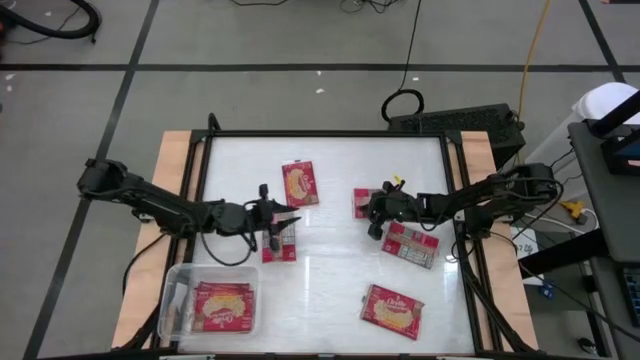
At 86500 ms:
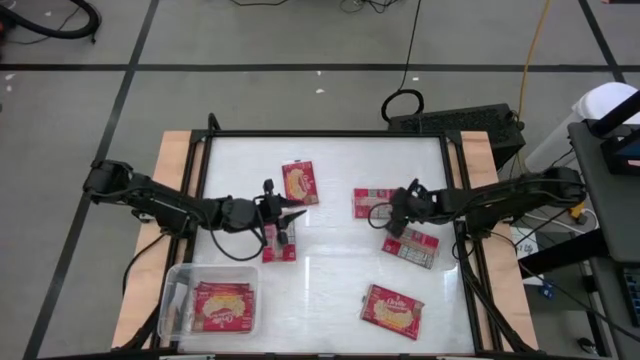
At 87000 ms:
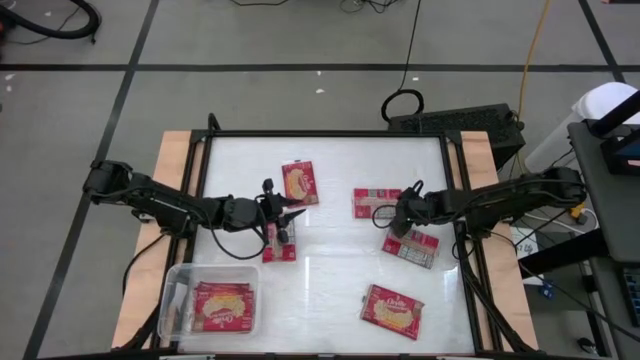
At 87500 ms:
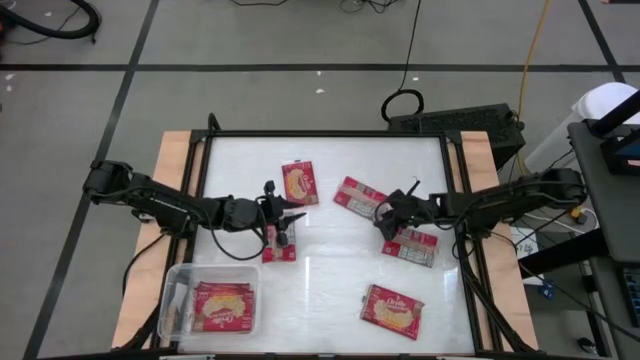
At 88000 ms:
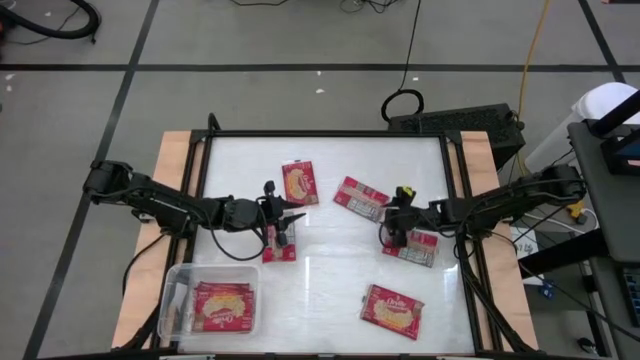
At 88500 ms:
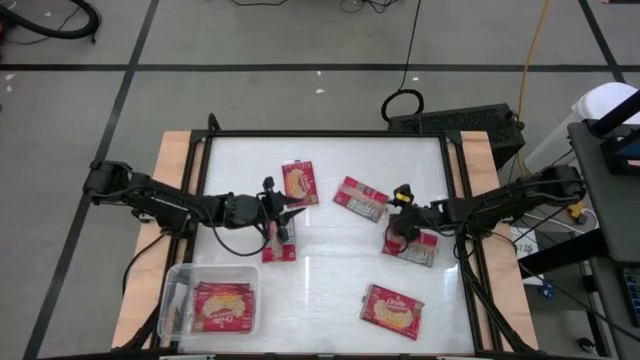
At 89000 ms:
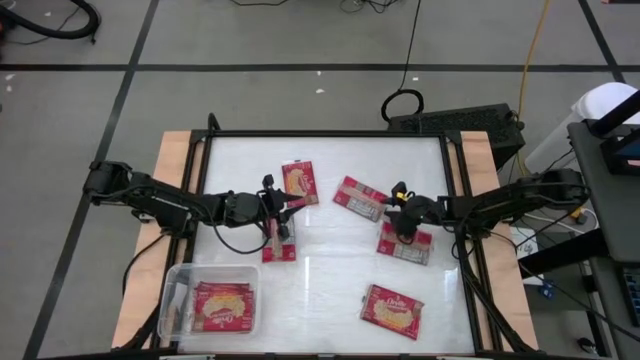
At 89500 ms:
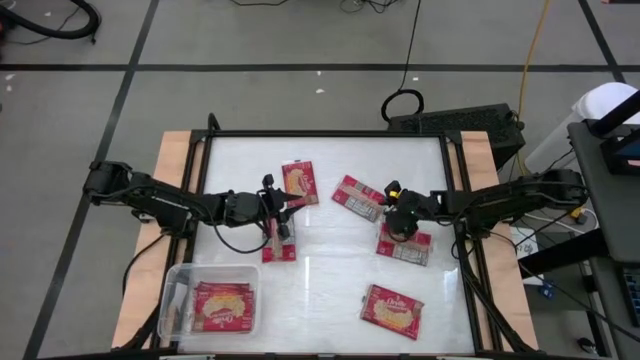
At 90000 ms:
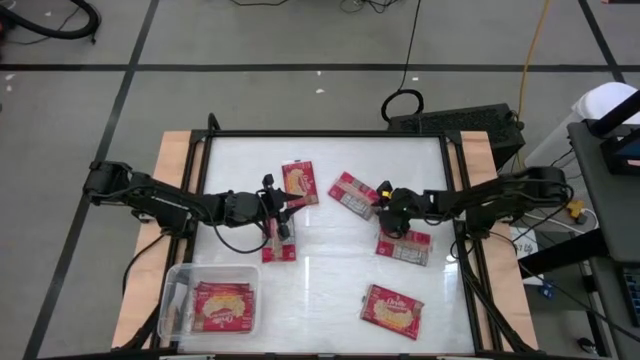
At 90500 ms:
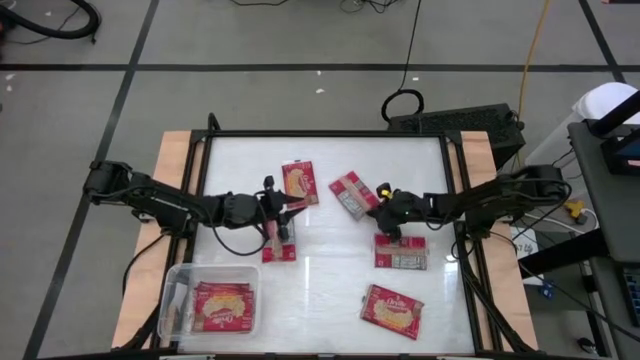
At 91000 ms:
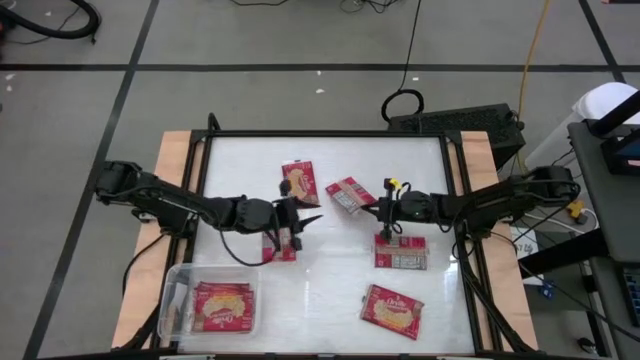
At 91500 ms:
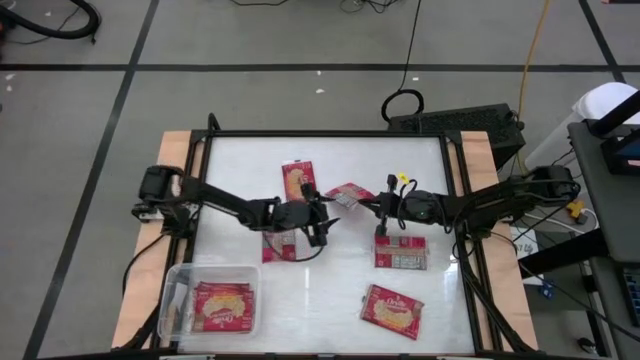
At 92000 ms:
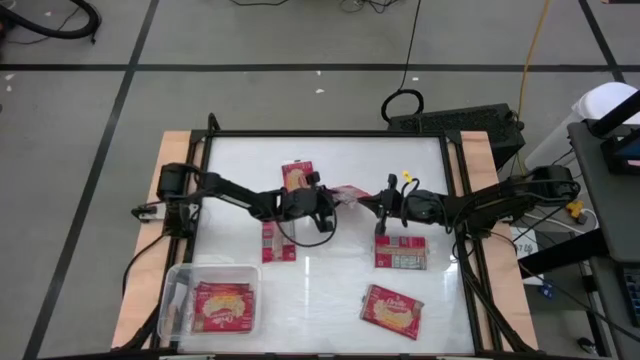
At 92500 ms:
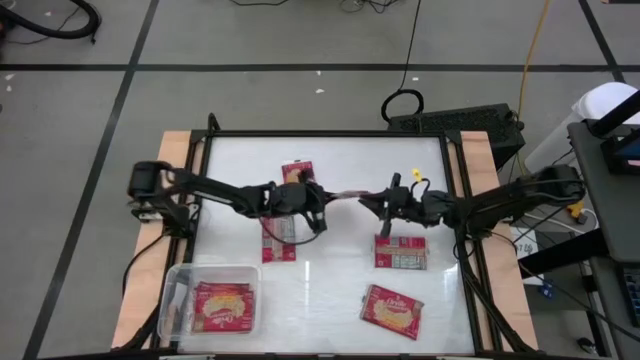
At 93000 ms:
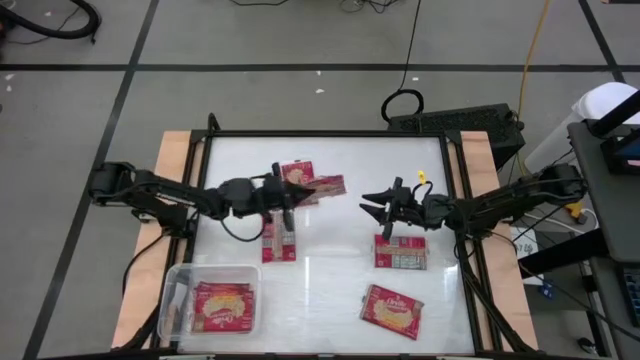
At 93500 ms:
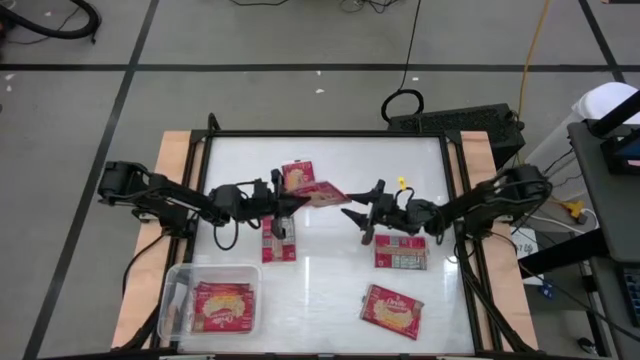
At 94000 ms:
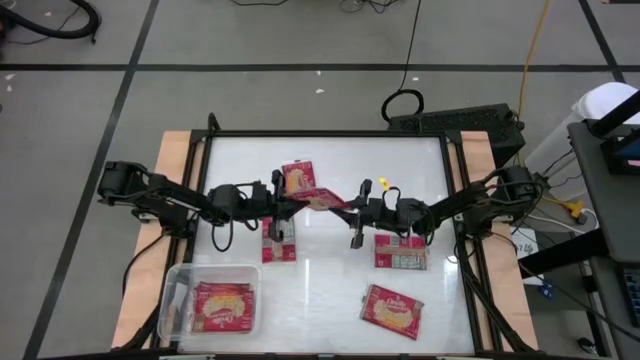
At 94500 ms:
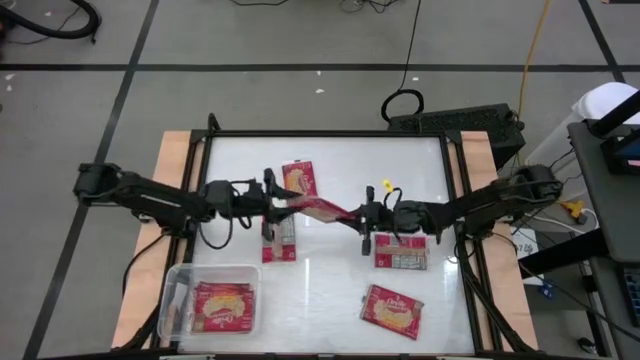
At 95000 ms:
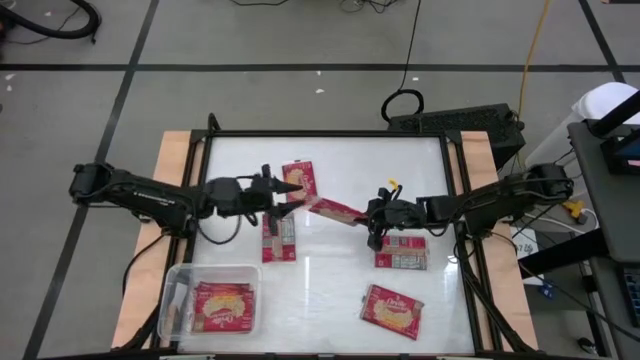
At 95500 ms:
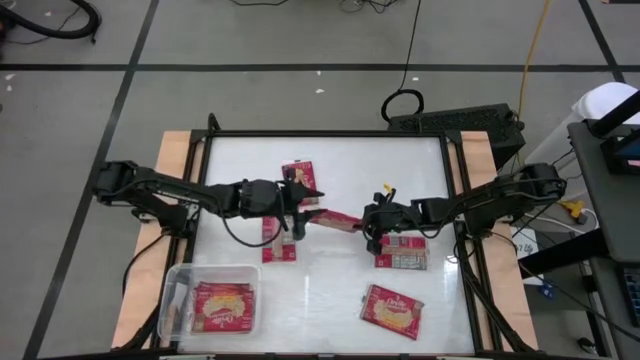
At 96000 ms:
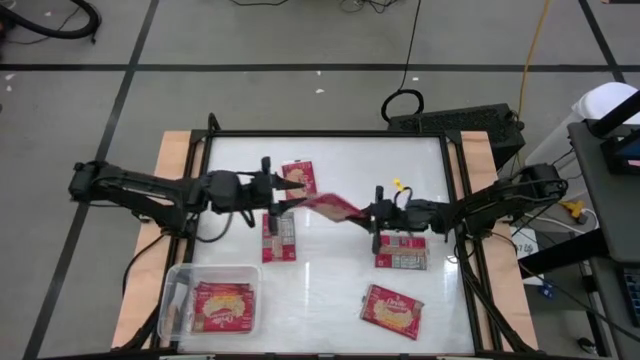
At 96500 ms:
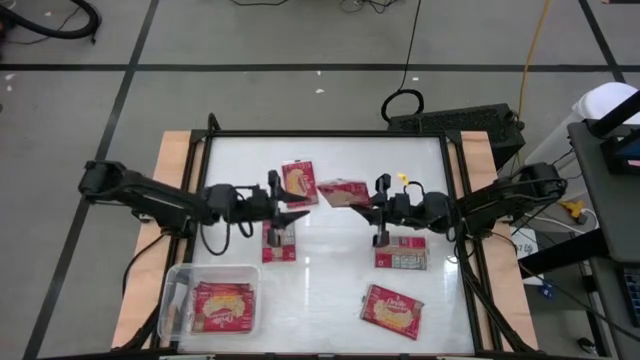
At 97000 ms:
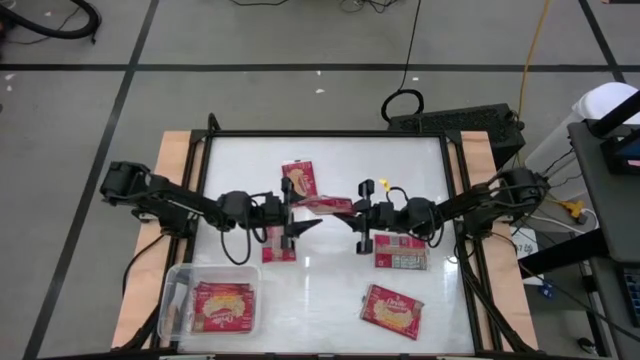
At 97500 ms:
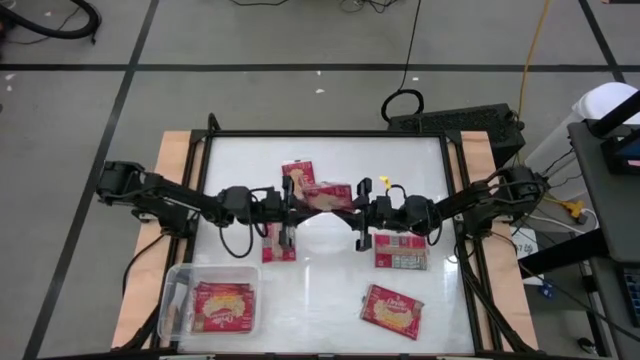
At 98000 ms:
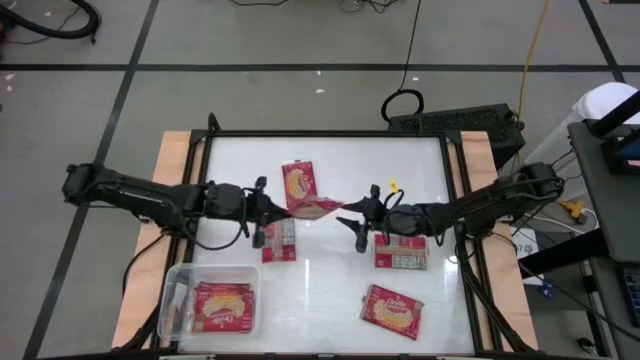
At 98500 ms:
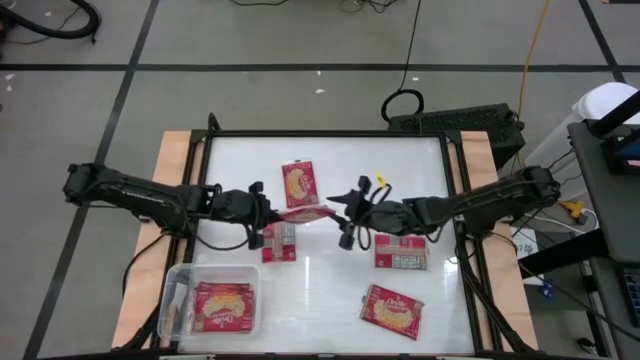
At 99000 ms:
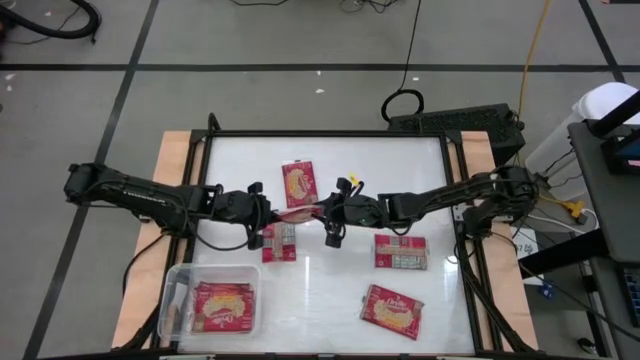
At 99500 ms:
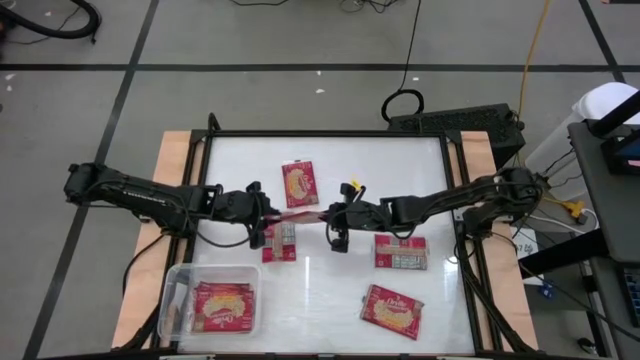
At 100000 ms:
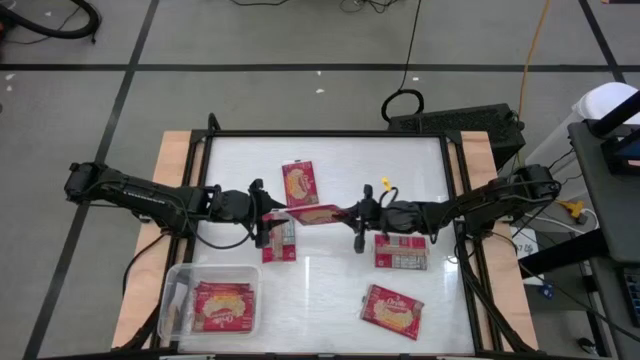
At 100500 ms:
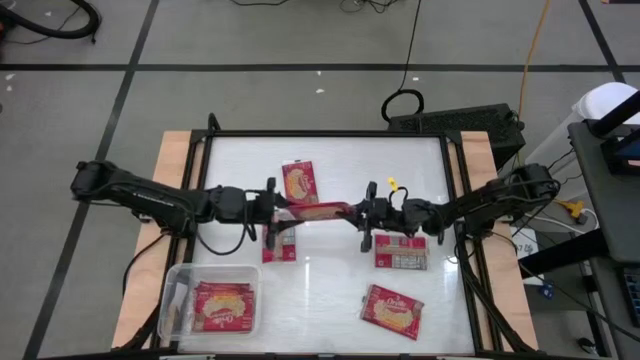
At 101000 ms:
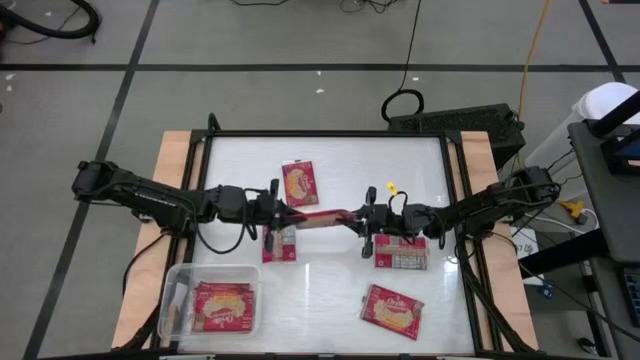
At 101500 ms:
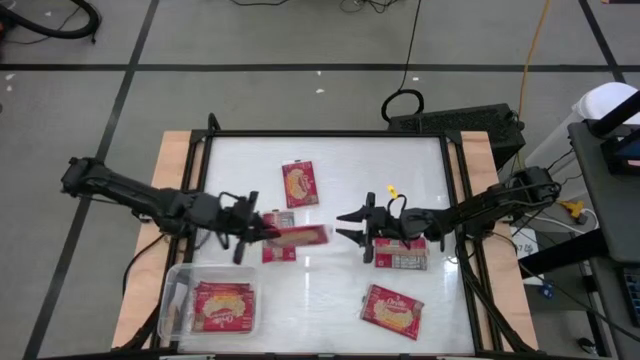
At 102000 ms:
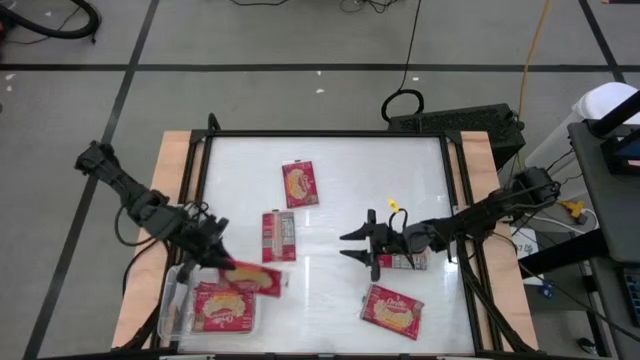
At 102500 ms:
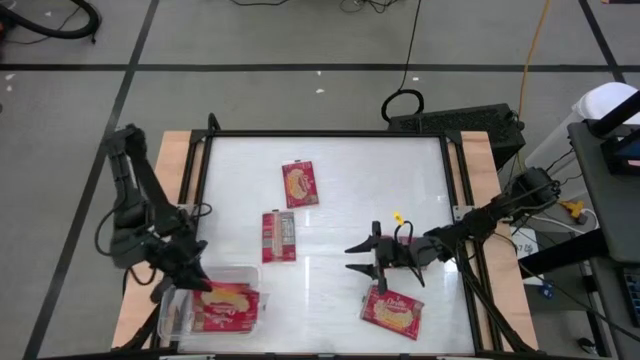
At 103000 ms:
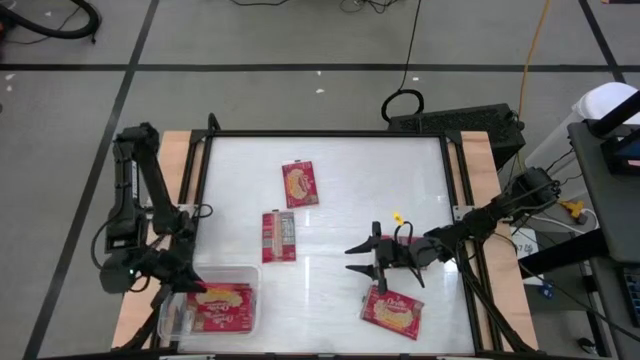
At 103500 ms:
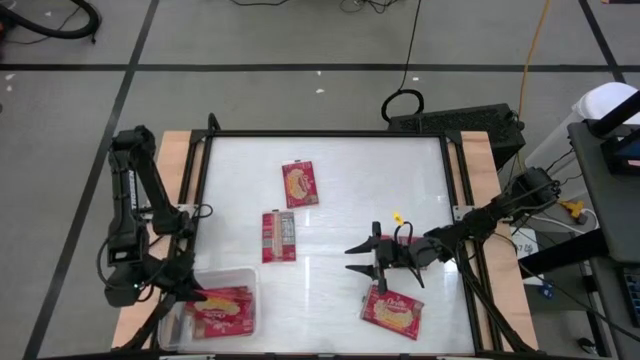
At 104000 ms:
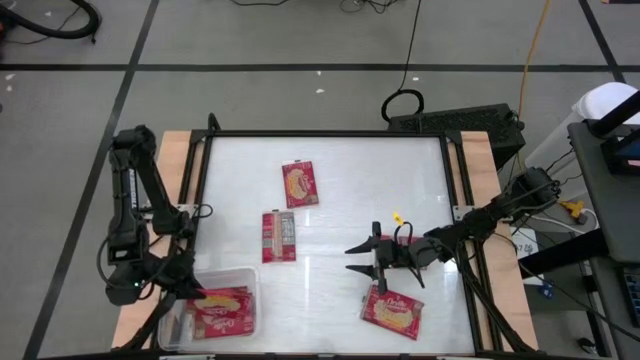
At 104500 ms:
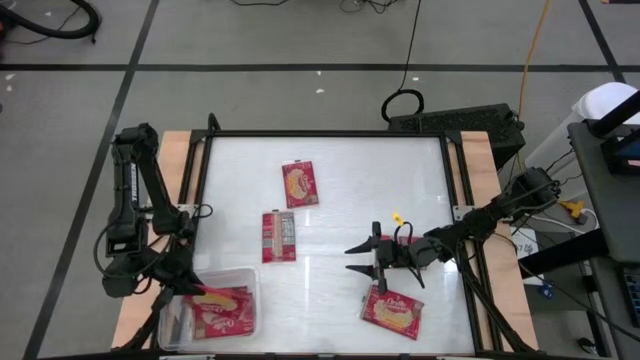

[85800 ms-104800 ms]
Task: Sort popcorn bags into baskets
Put the popcorn bag into the transparent bin
